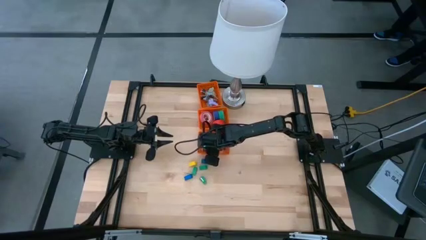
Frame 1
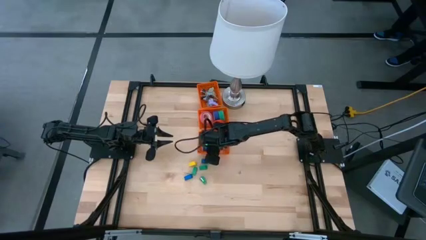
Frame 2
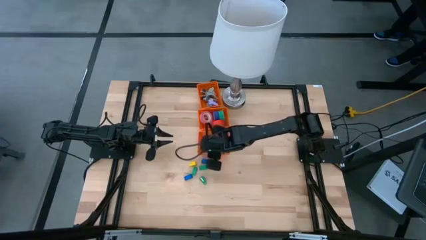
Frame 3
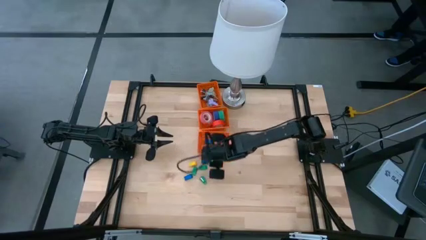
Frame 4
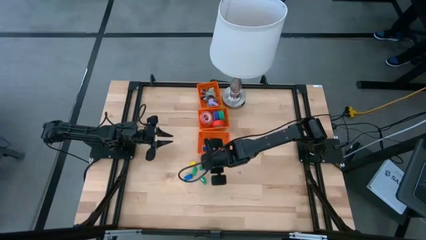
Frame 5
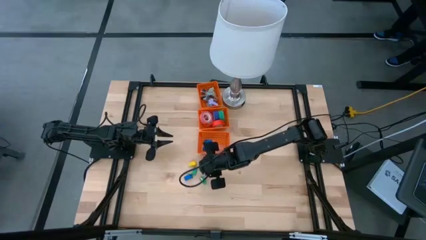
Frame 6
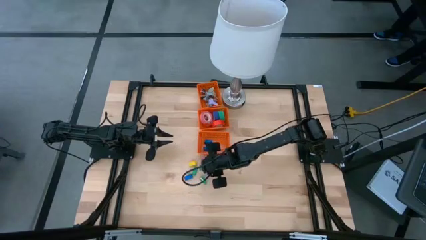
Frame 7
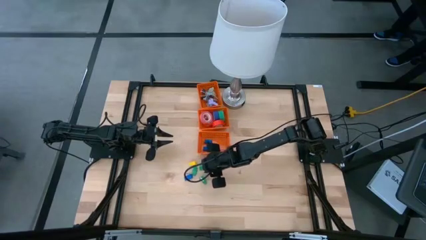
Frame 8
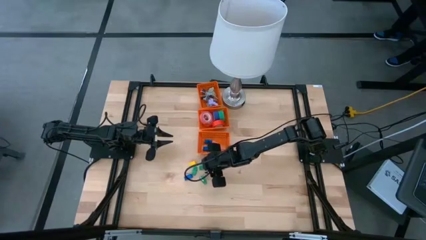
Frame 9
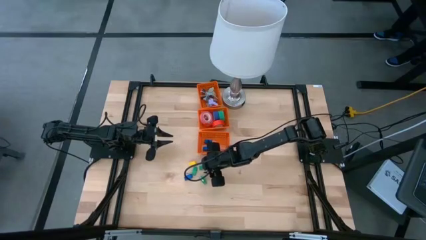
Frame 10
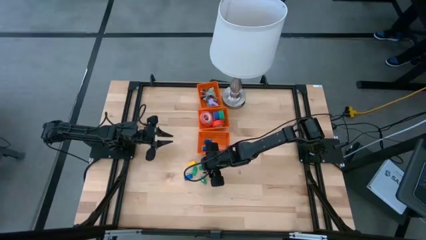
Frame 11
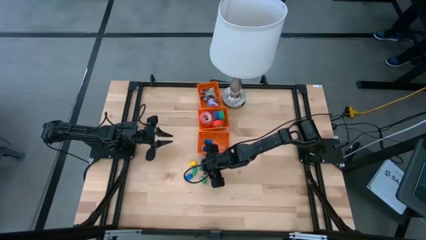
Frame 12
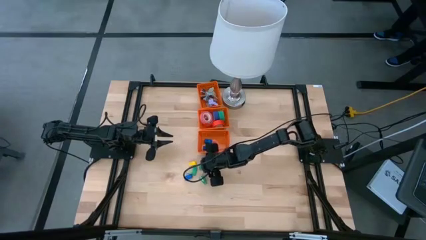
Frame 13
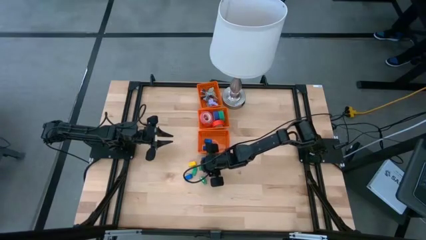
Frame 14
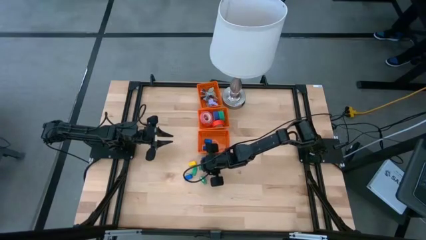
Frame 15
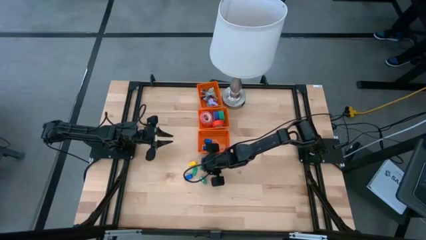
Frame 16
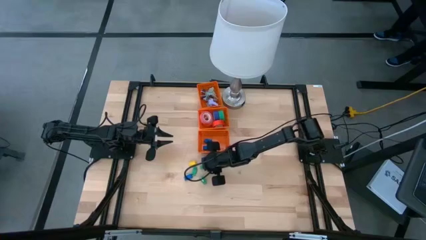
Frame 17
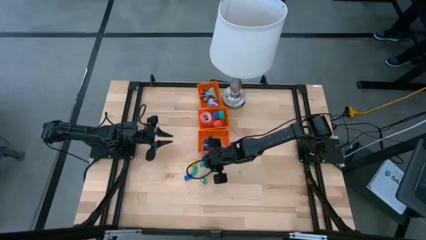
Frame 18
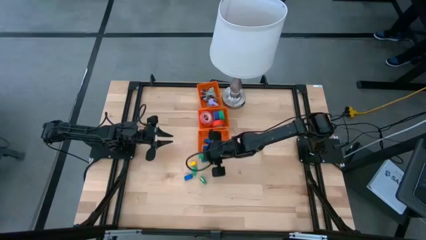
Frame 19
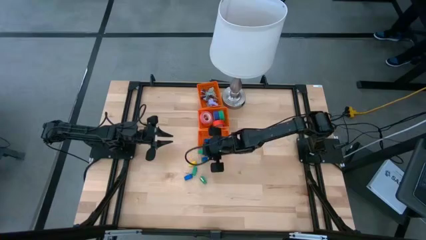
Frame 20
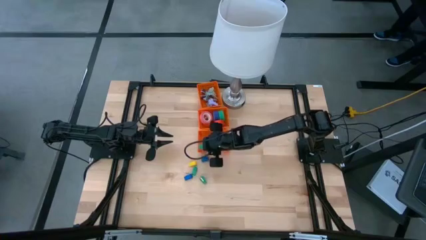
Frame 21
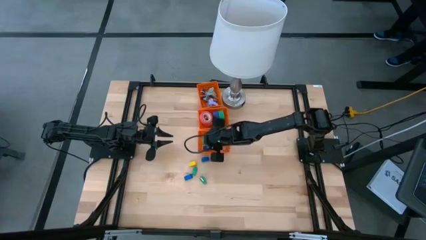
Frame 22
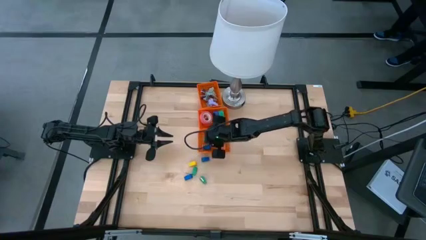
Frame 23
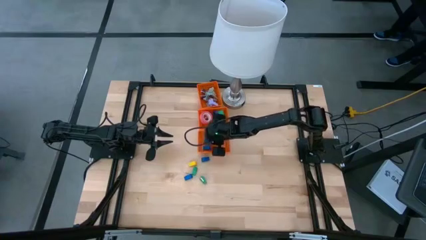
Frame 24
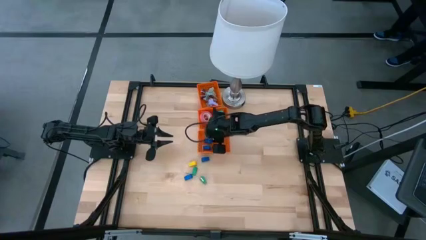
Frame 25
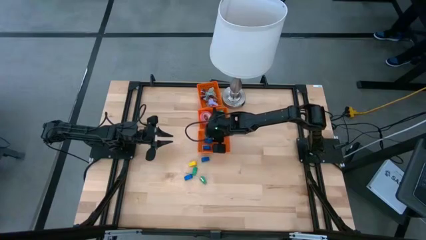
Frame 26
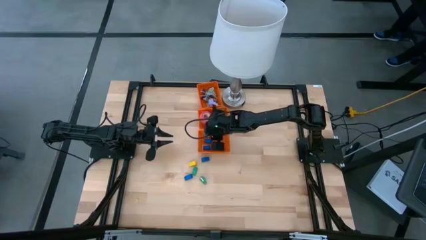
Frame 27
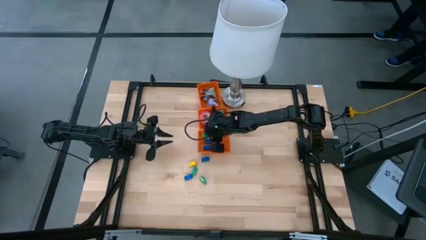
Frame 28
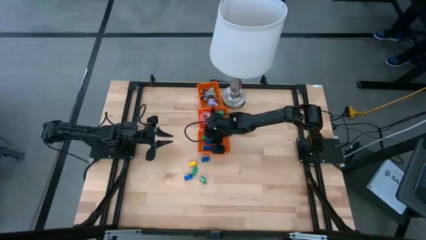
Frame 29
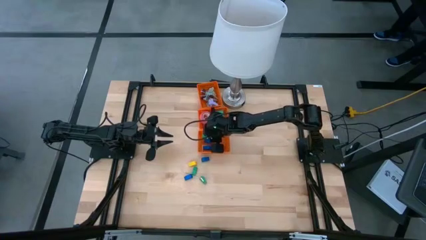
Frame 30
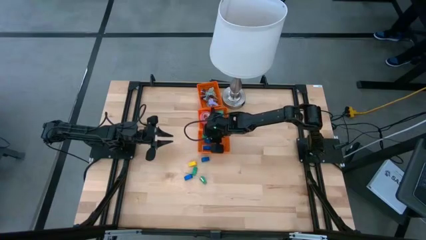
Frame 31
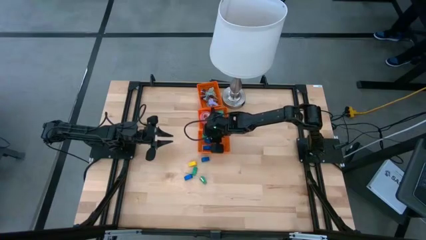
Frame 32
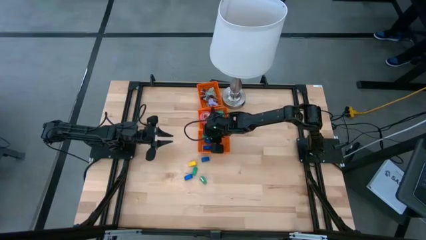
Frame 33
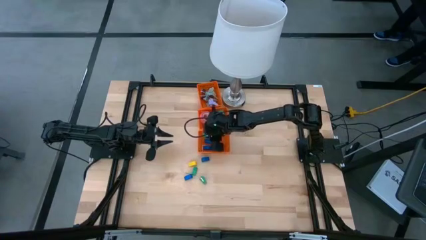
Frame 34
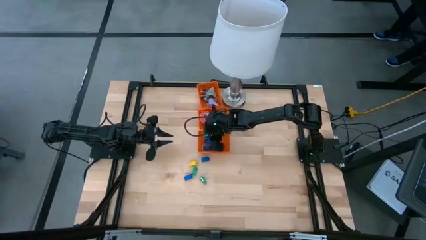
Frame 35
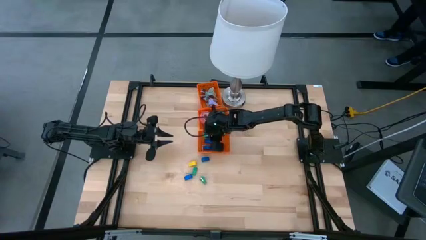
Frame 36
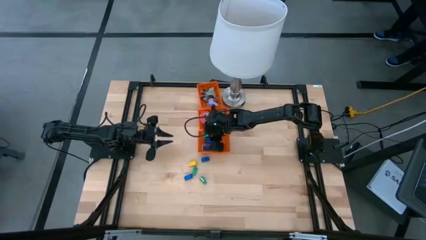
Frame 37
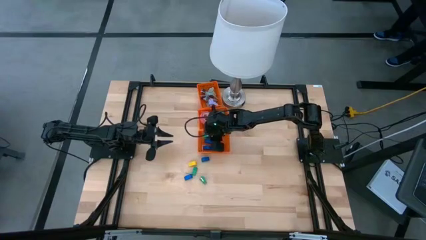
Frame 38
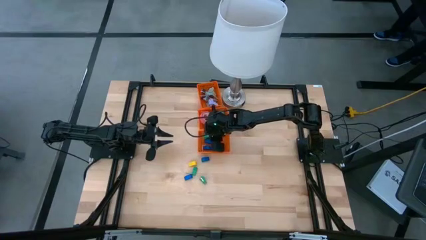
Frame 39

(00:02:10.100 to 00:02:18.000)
Task: Pick and place Stapler, Stapler remover, tape
Put the green stapler into the bottom orange basket

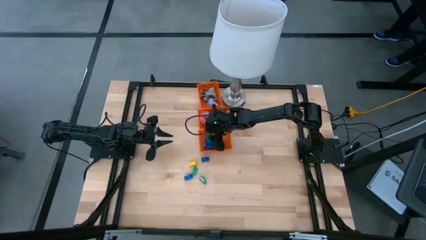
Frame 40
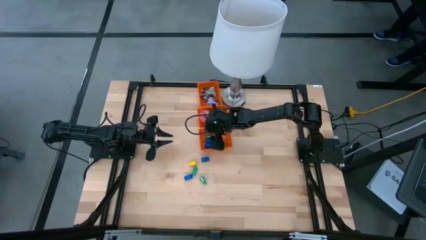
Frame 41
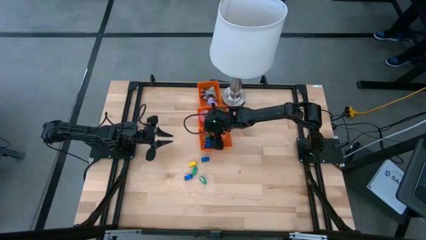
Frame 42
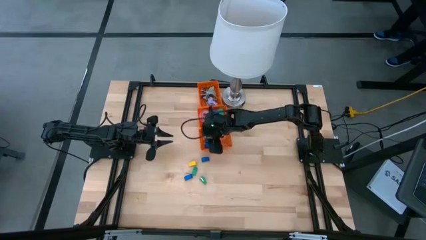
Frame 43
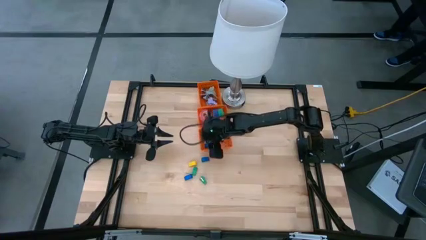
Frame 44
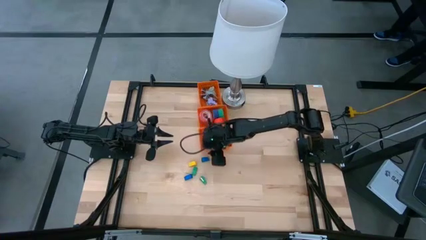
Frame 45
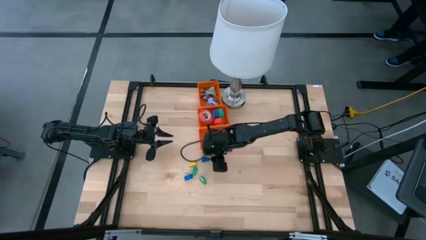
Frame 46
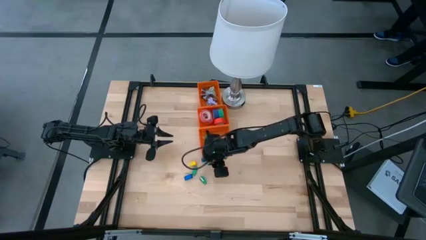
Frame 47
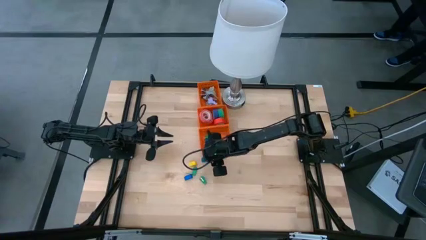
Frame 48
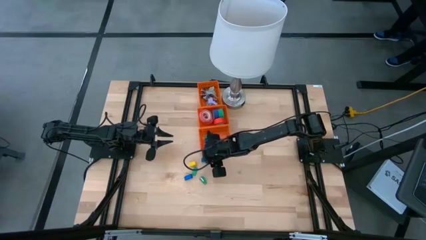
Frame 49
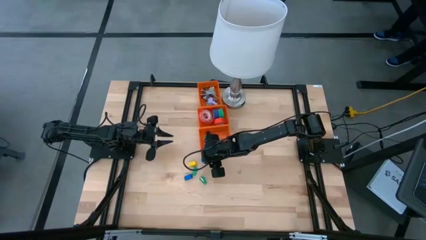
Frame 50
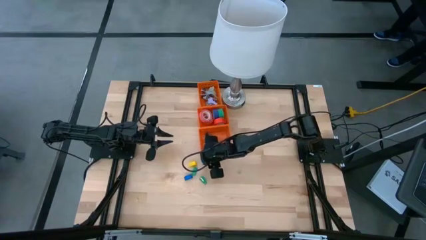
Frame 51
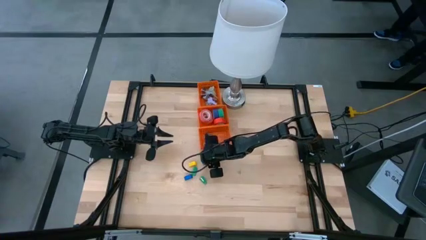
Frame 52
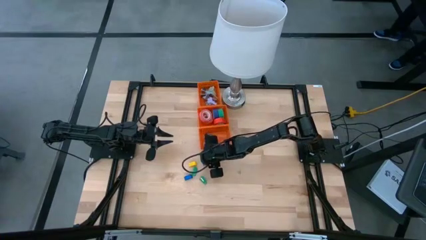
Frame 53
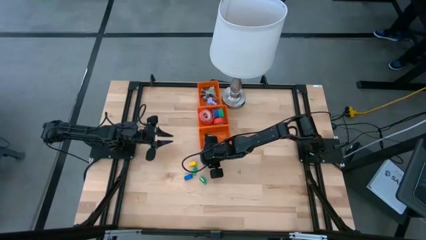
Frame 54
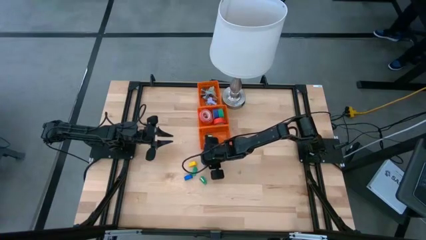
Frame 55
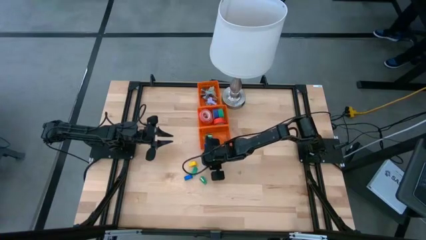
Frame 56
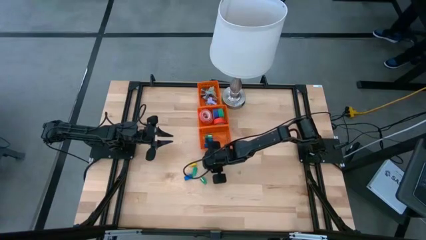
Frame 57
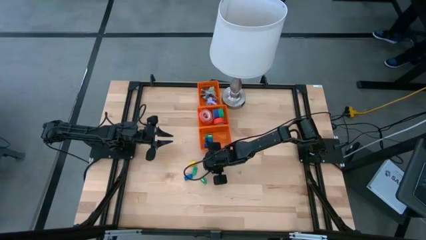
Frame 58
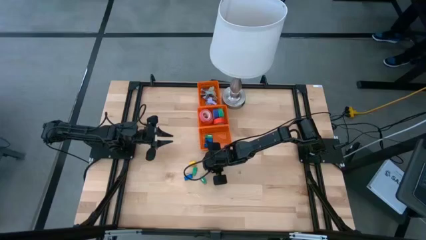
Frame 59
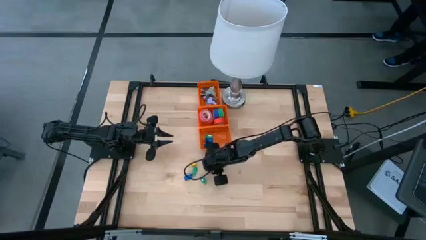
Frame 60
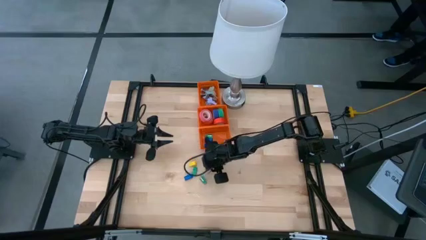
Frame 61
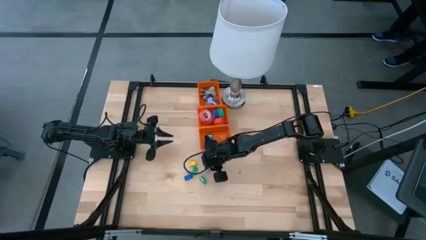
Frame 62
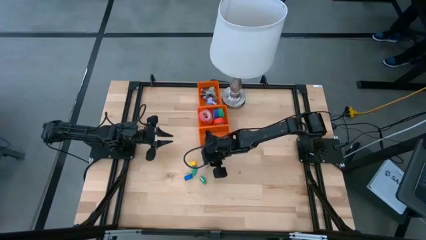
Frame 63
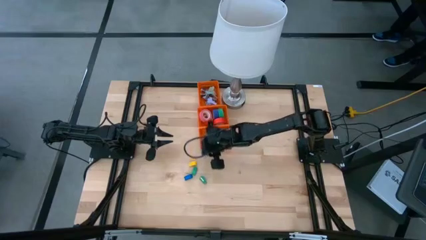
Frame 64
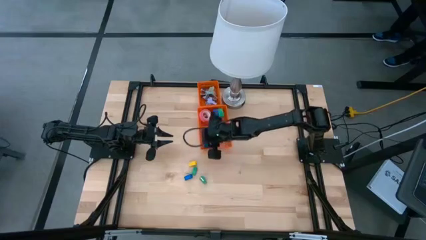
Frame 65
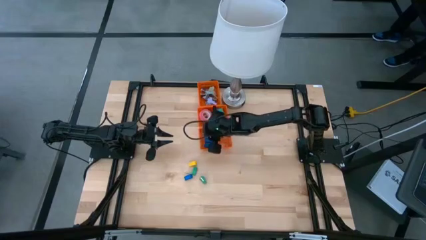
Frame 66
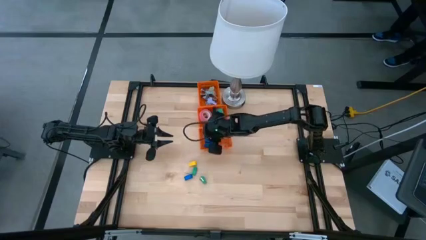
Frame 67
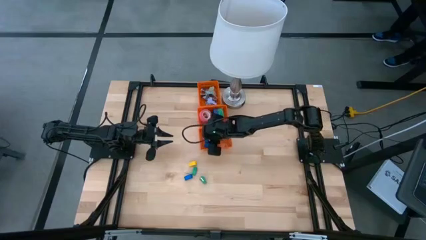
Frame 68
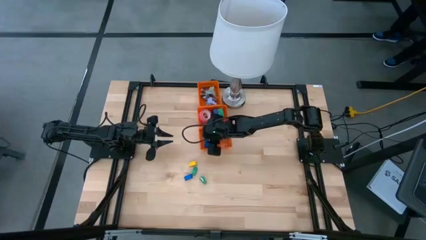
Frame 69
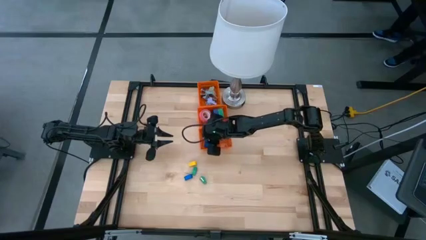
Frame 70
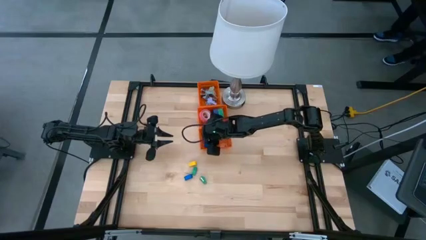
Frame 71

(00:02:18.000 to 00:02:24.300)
Put the blue stapler into the bottom orange basket

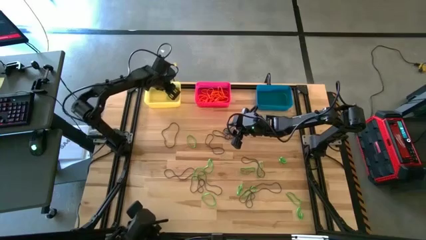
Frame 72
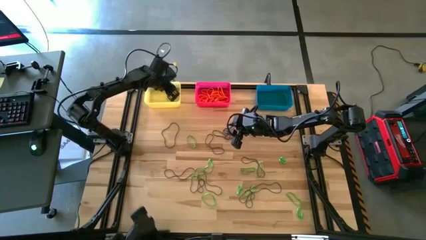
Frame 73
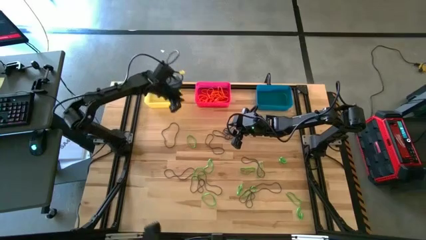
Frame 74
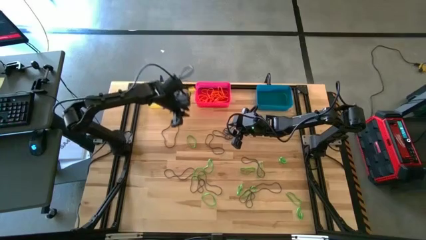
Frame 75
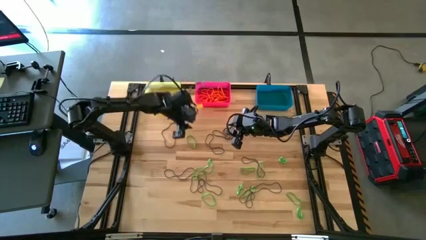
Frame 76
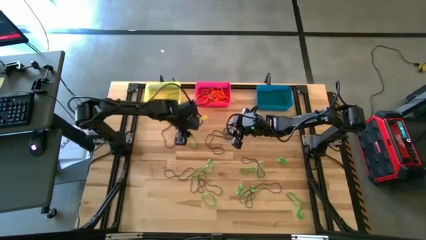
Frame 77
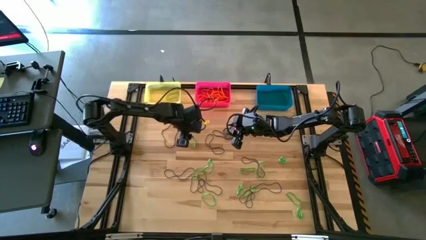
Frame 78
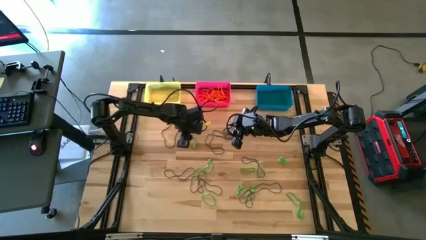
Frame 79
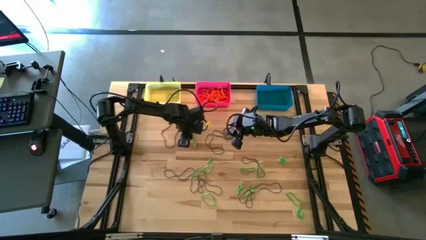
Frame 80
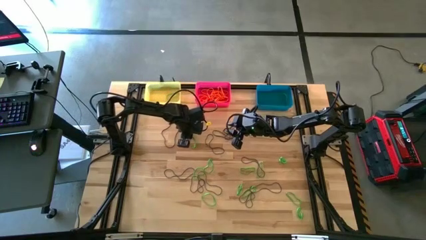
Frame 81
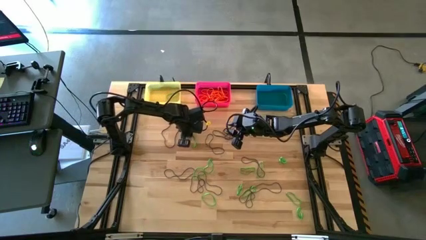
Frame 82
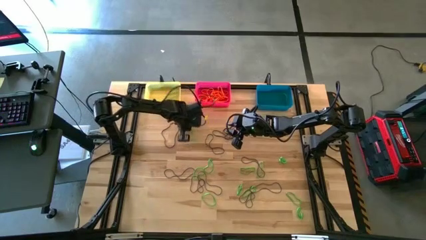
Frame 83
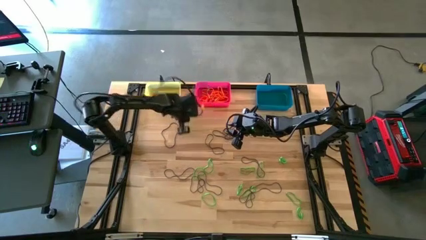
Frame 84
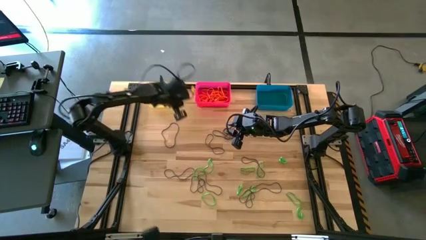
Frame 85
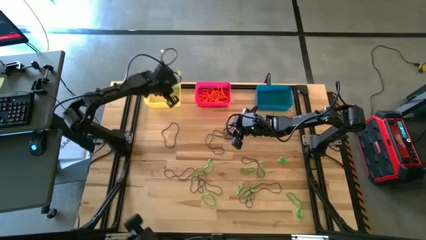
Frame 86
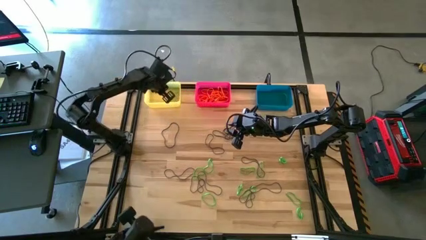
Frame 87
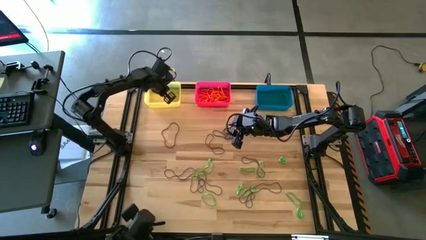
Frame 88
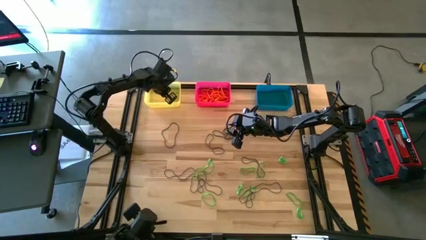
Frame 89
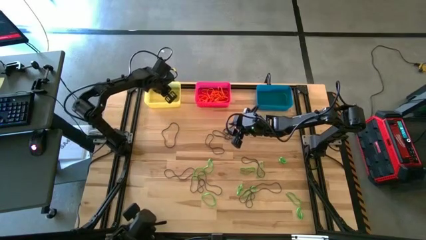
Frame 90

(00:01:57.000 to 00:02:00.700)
Task: Sort rubber bands into baskets
Put the green rubber band into the yellow bin
